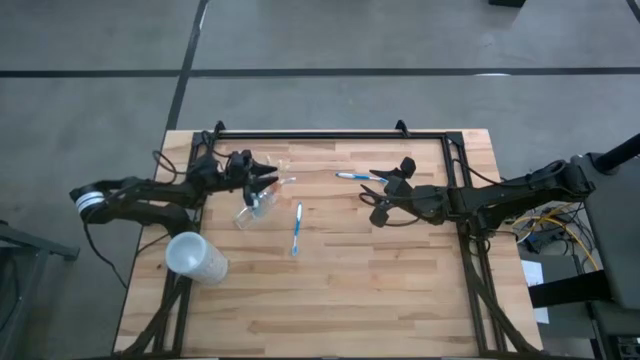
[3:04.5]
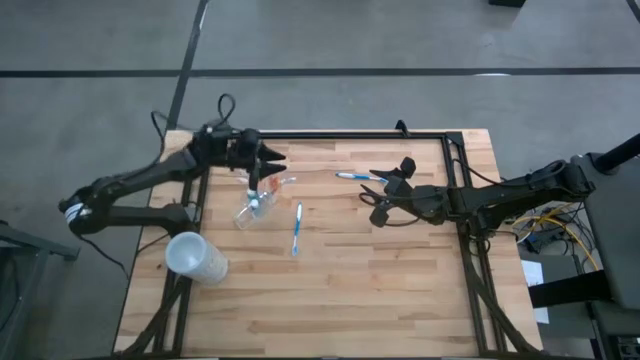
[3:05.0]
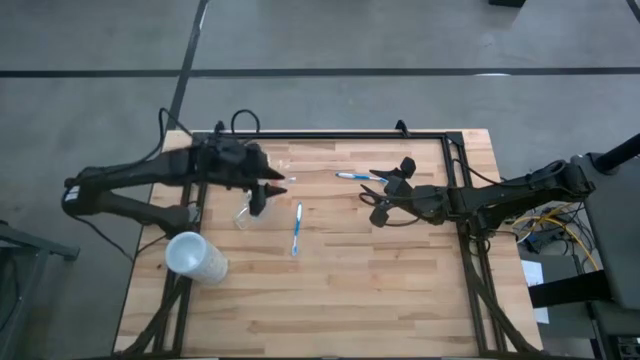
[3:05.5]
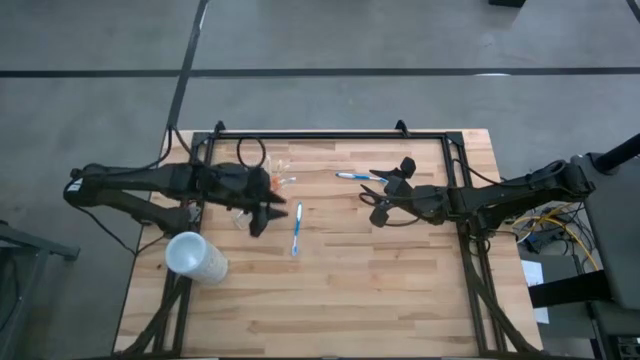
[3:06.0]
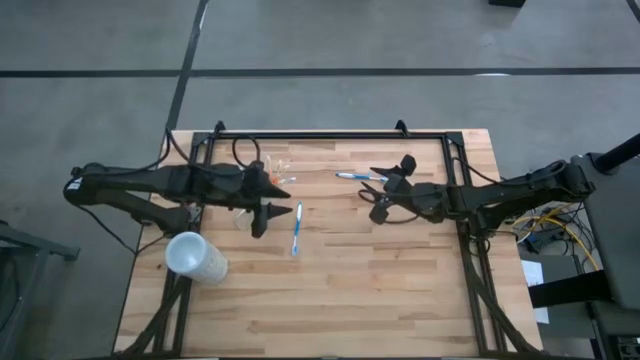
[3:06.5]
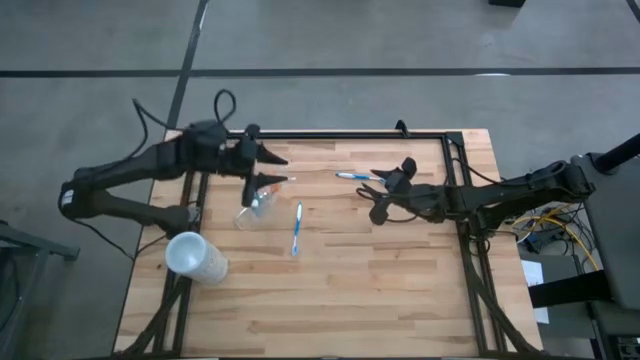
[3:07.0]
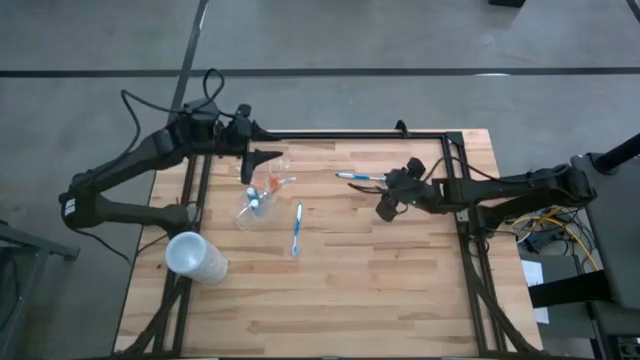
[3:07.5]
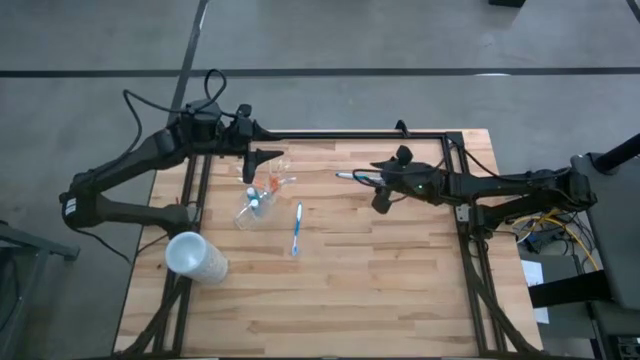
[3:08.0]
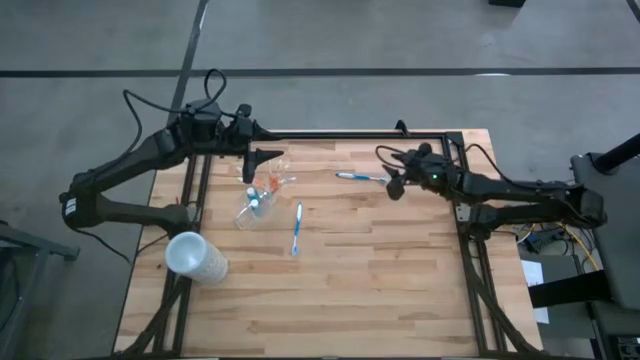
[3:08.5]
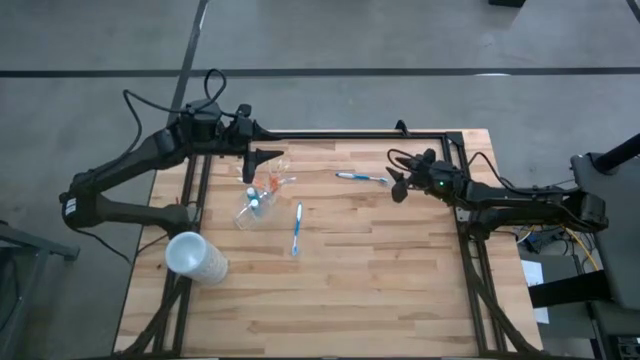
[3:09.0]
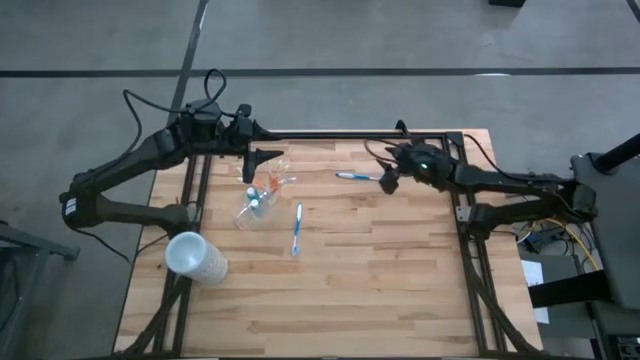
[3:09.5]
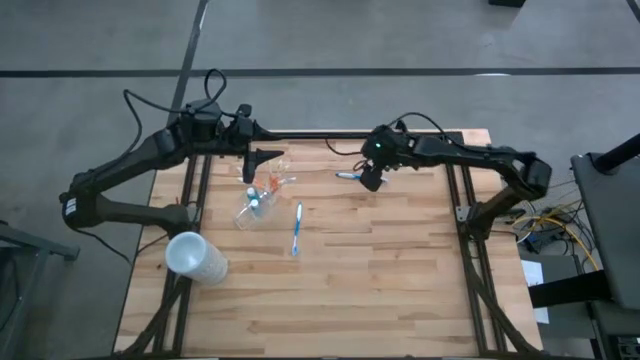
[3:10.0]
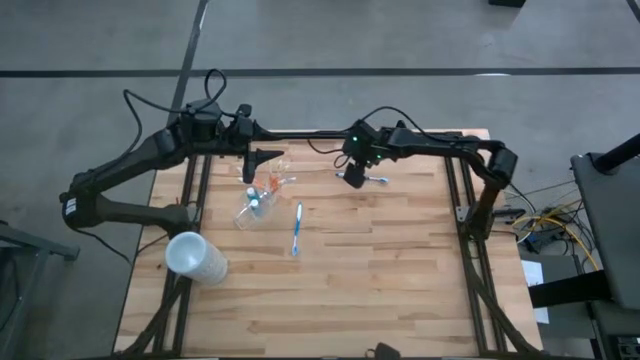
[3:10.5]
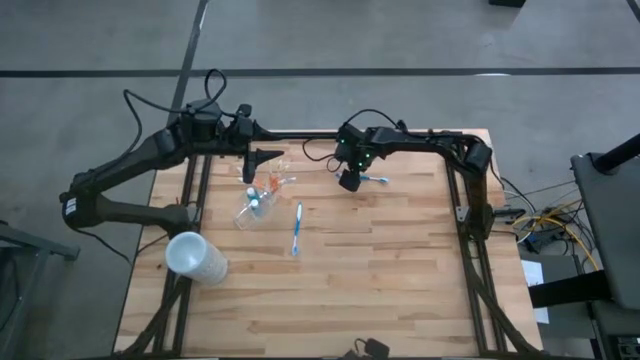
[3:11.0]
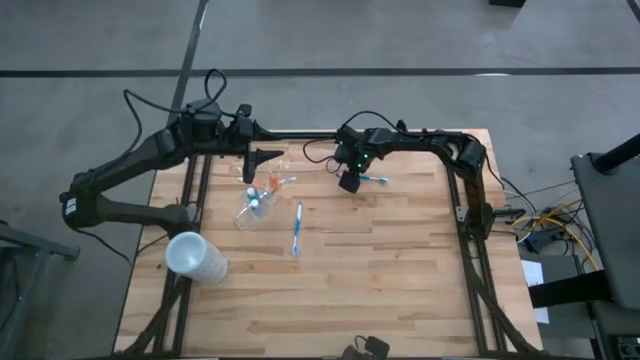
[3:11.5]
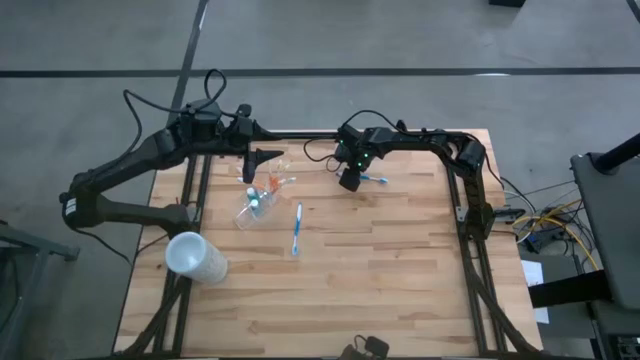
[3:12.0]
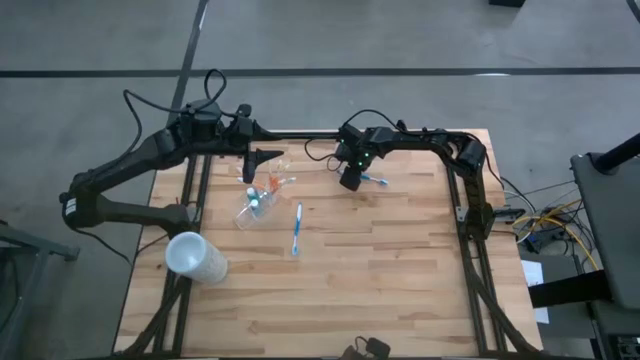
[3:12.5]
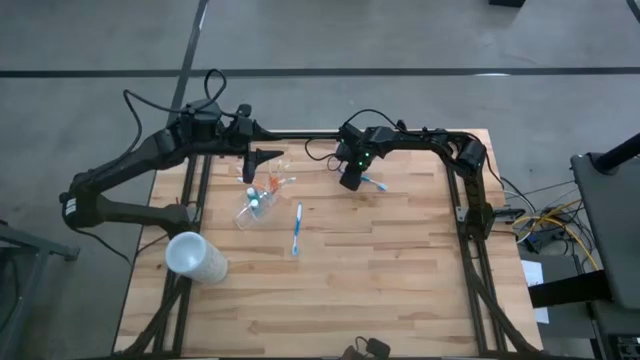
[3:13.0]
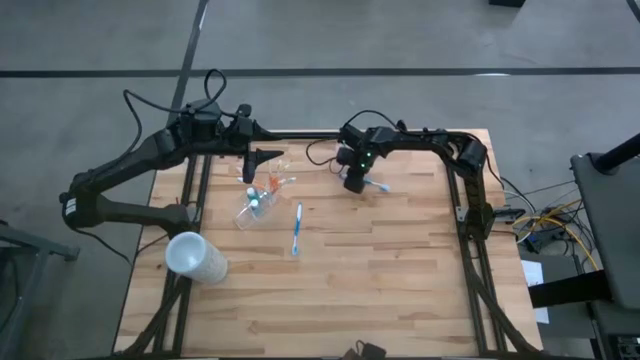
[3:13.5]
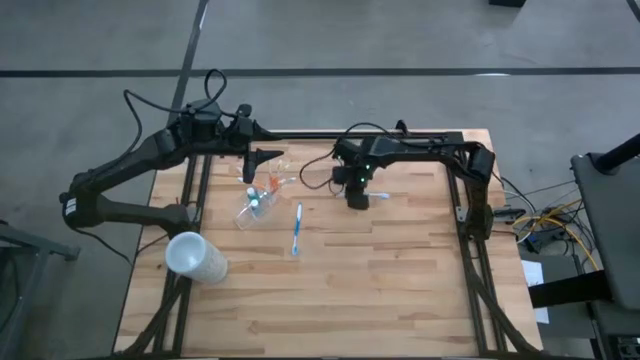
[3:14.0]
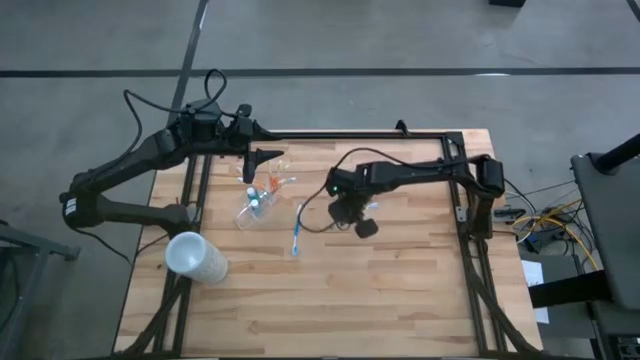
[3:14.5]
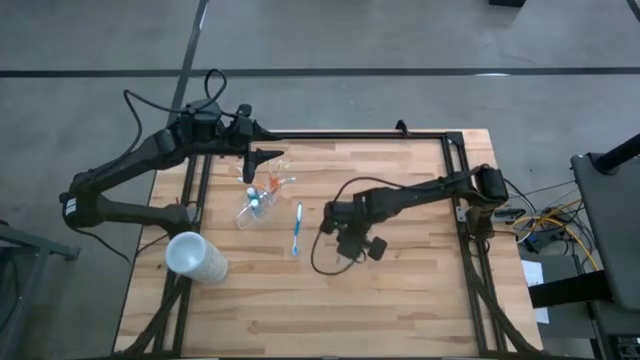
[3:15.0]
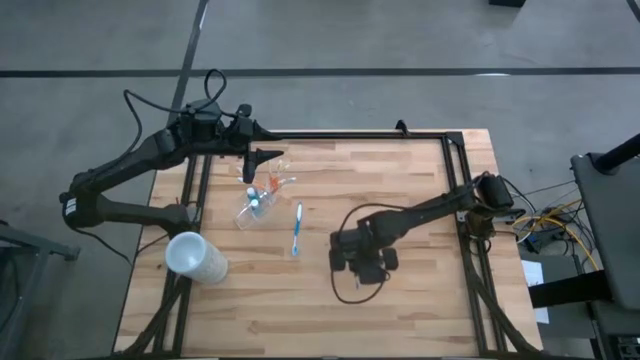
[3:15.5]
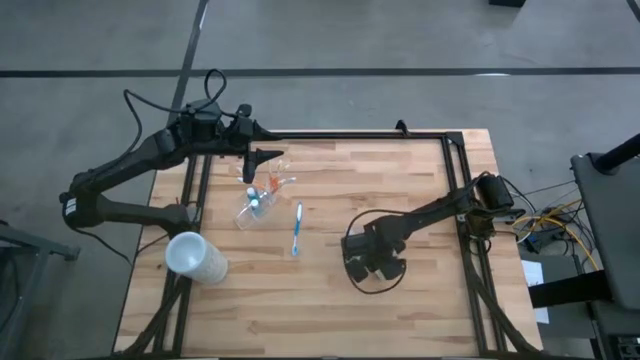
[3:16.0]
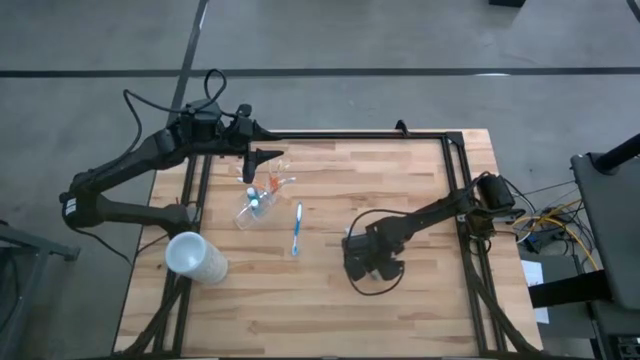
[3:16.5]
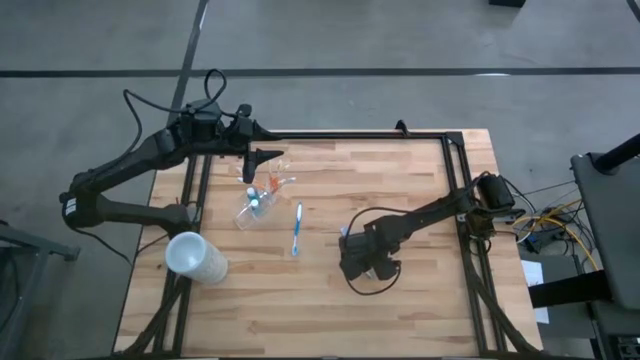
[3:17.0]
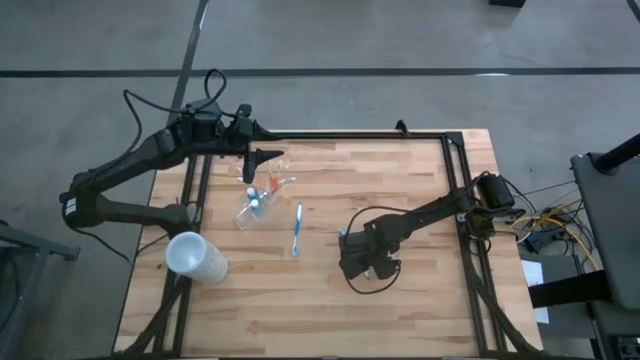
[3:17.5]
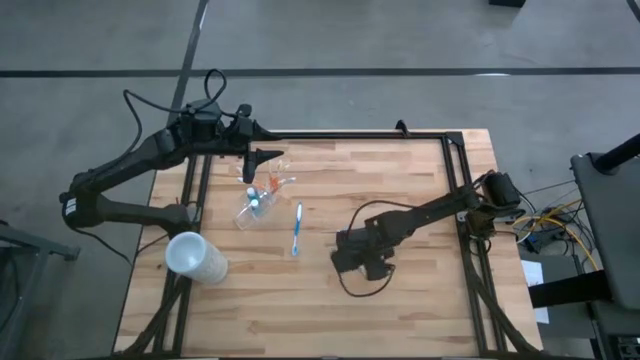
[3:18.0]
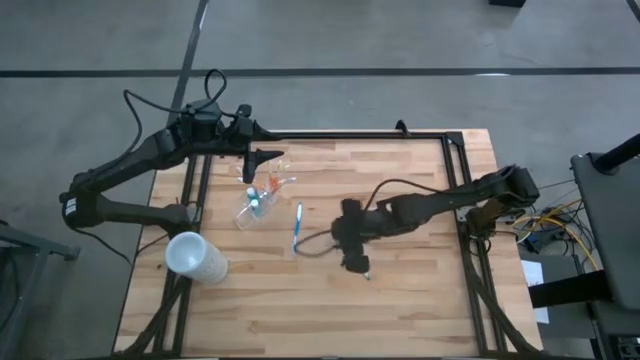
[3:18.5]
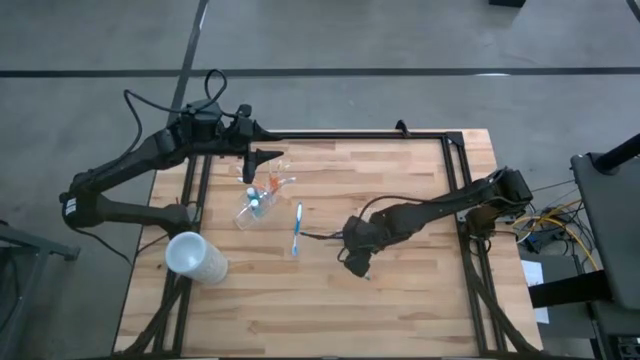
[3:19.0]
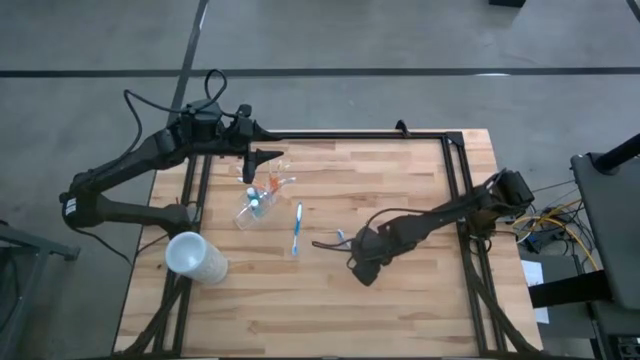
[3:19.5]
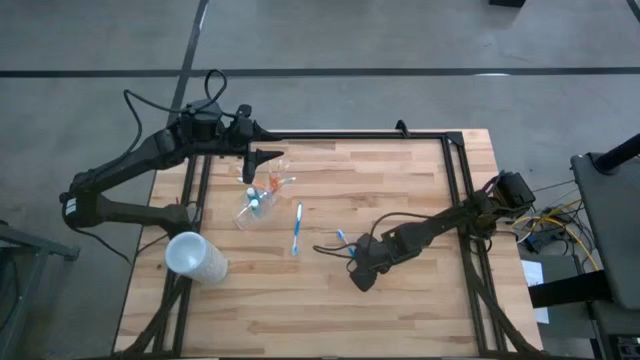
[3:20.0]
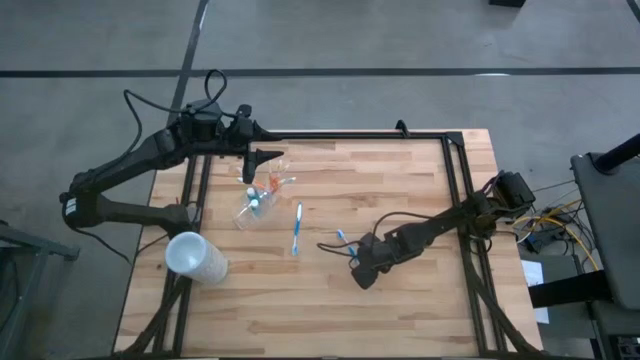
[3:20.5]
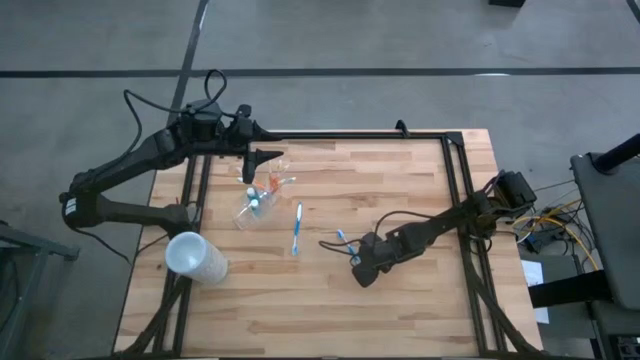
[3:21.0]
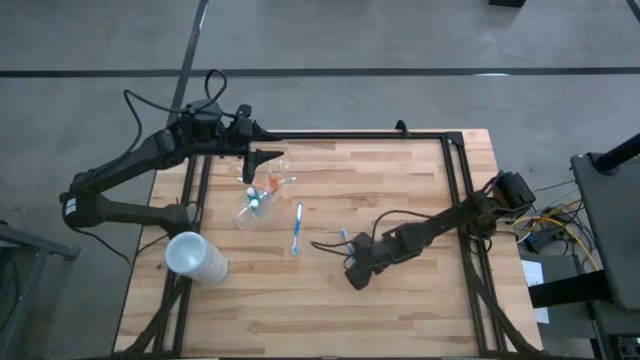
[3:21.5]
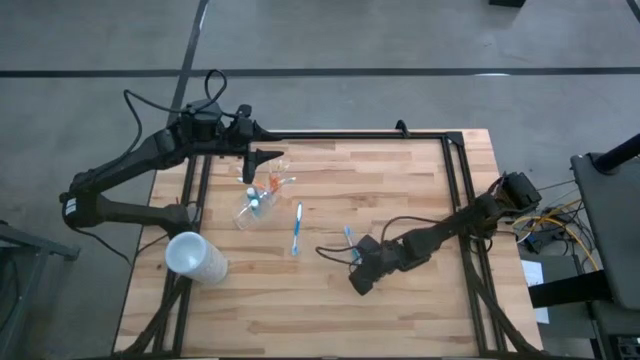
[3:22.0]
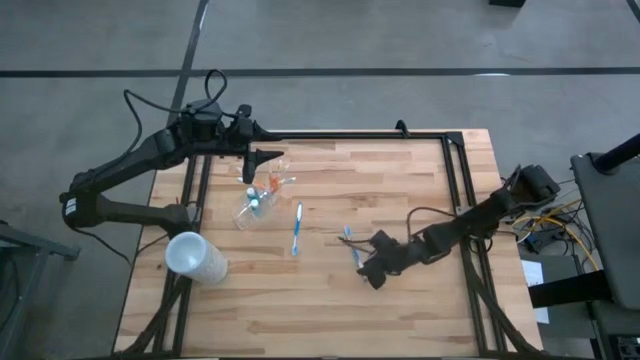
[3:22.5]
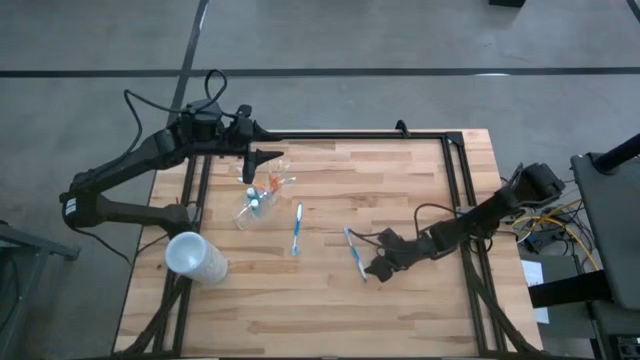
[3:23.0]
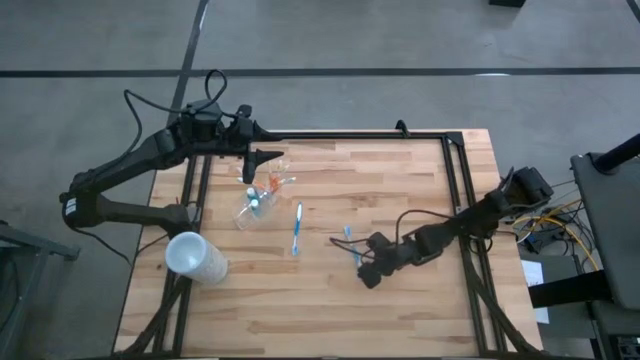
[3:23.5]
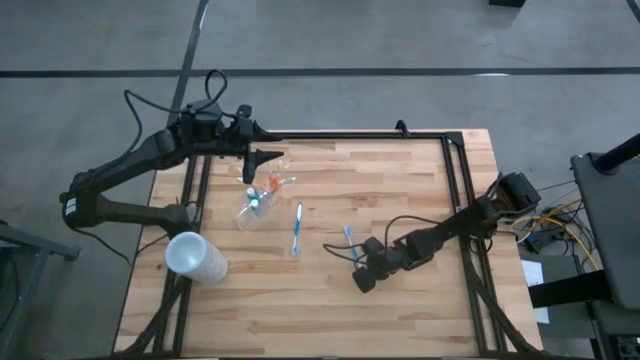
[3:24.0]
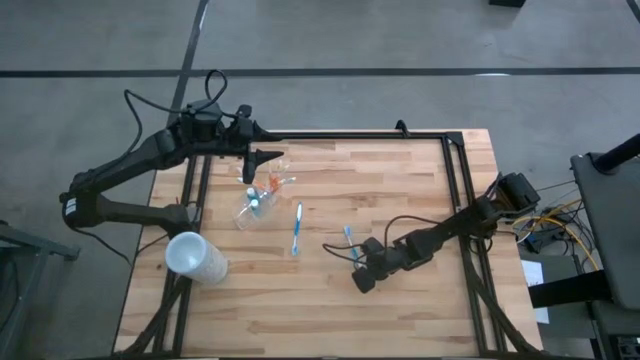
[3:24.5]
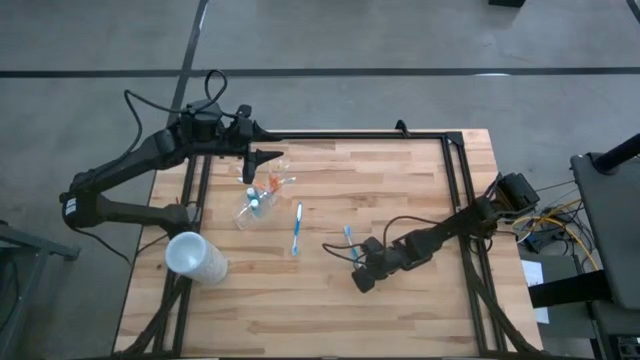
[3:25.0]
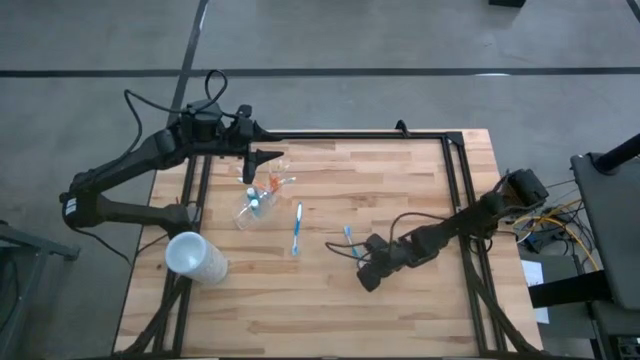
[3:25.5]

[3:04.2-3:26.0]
Task: Pick & Place toothbrushing station
Put the top blue toothbrush into the transparent organizer
